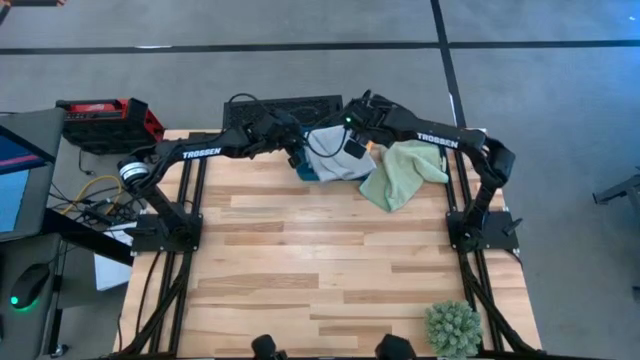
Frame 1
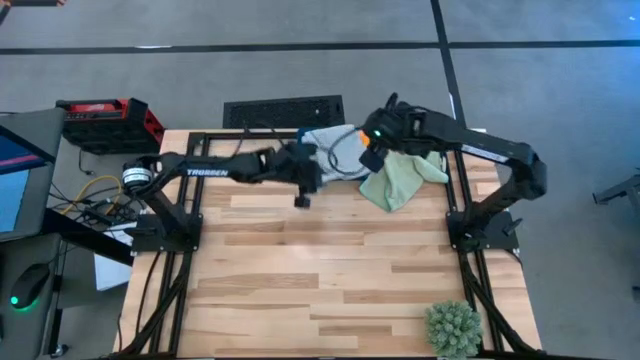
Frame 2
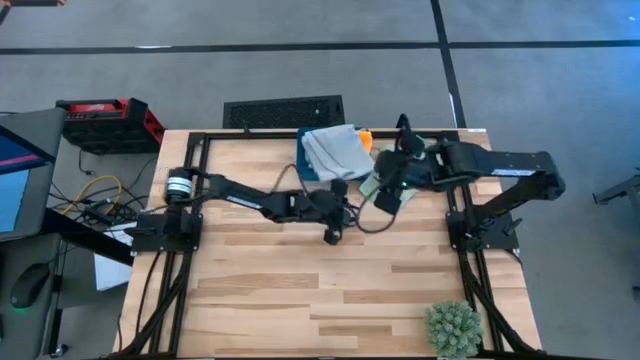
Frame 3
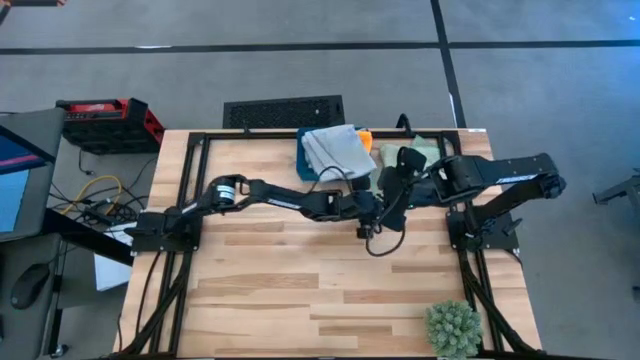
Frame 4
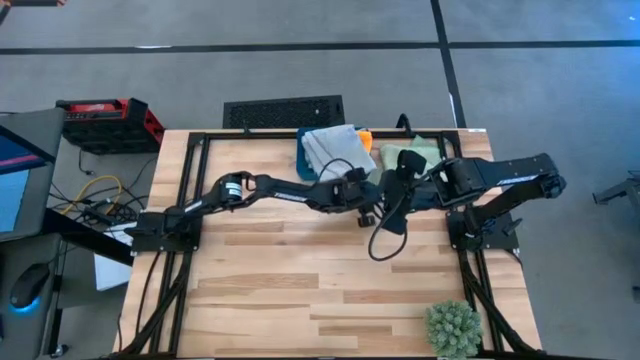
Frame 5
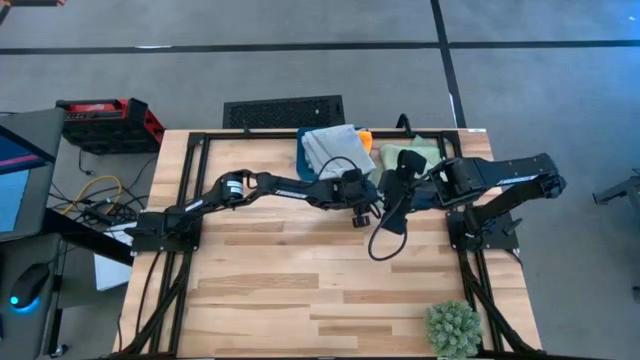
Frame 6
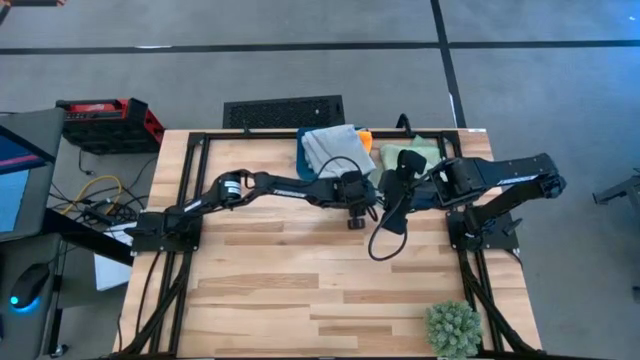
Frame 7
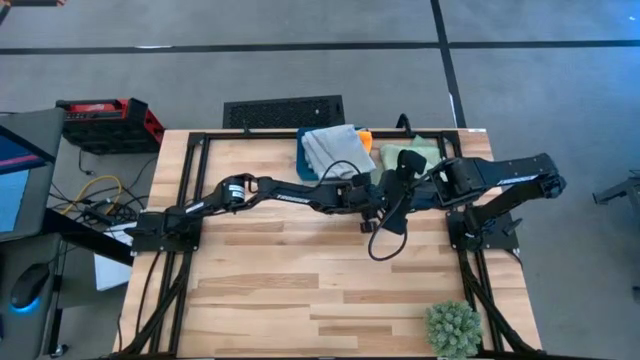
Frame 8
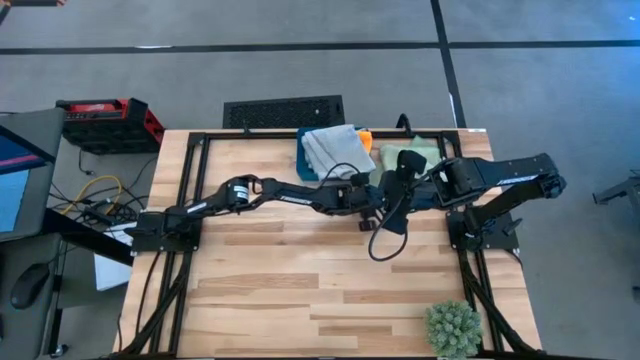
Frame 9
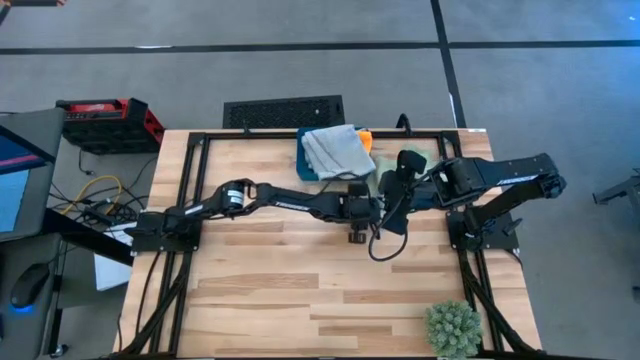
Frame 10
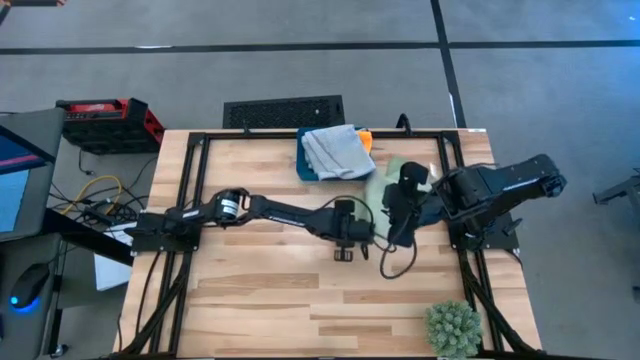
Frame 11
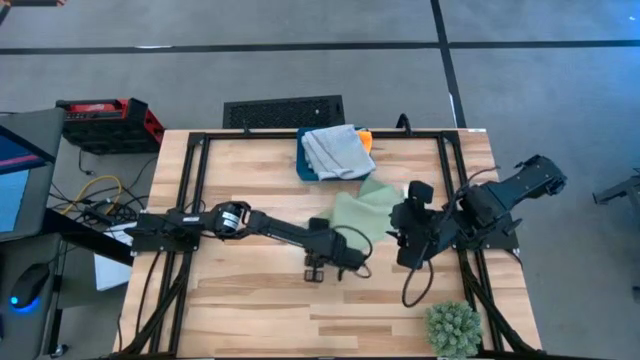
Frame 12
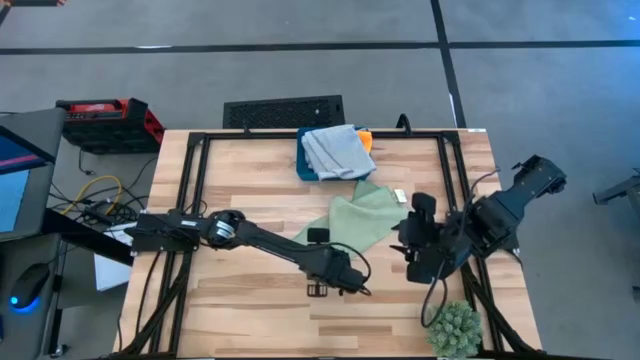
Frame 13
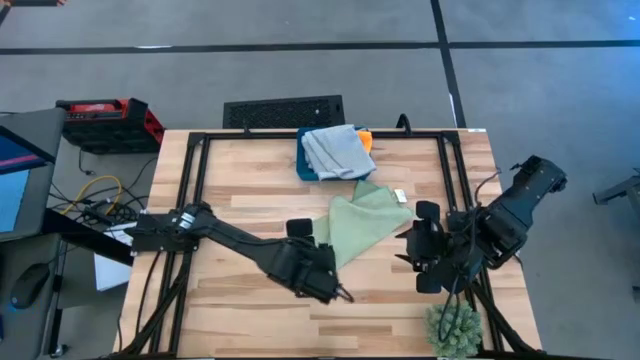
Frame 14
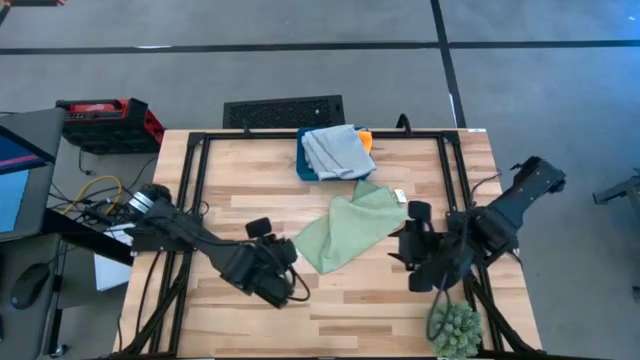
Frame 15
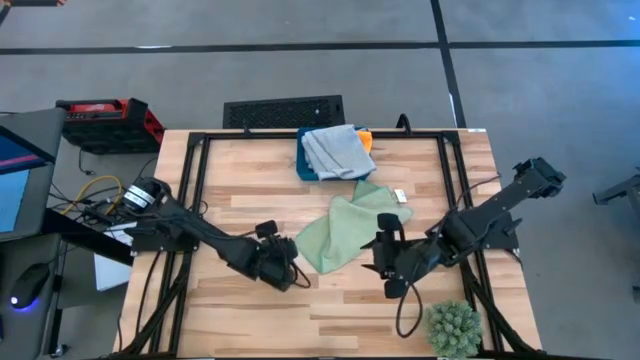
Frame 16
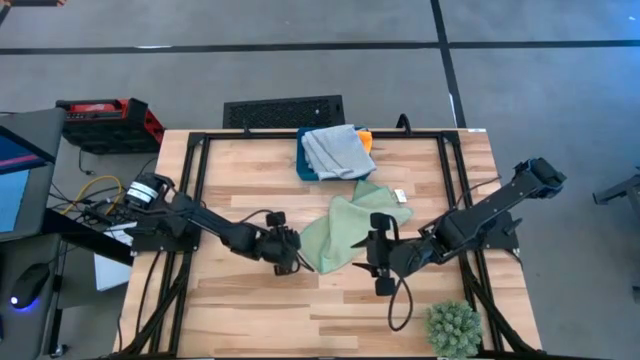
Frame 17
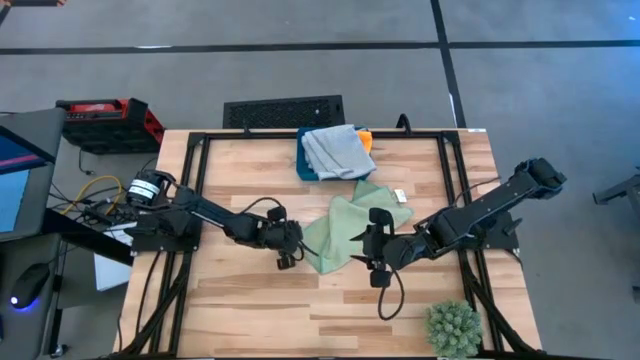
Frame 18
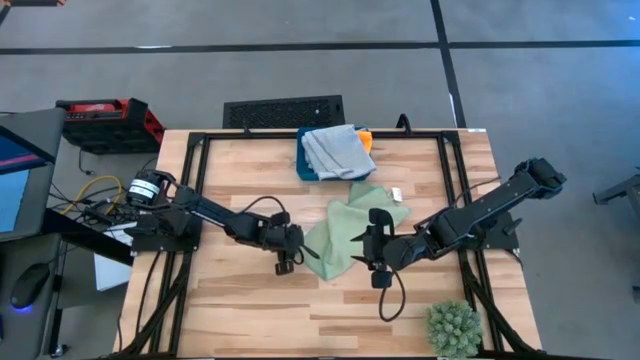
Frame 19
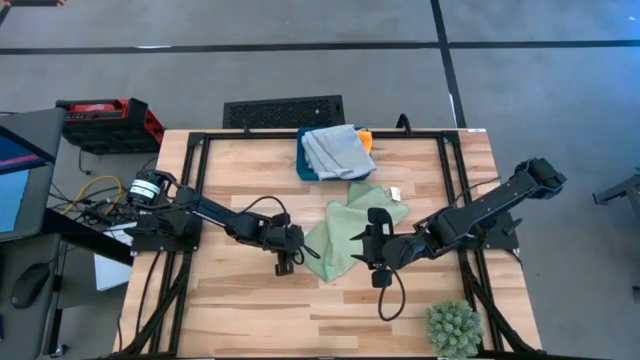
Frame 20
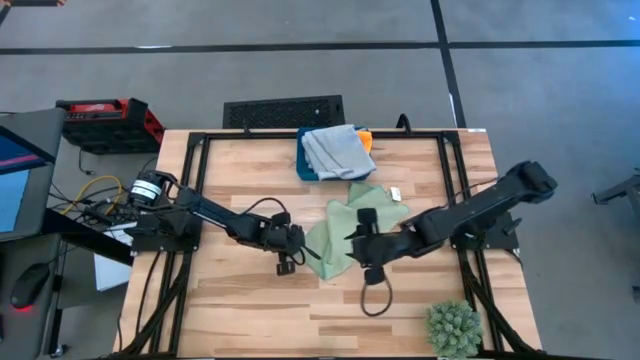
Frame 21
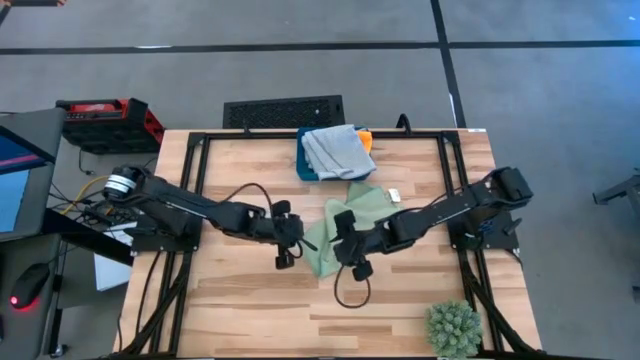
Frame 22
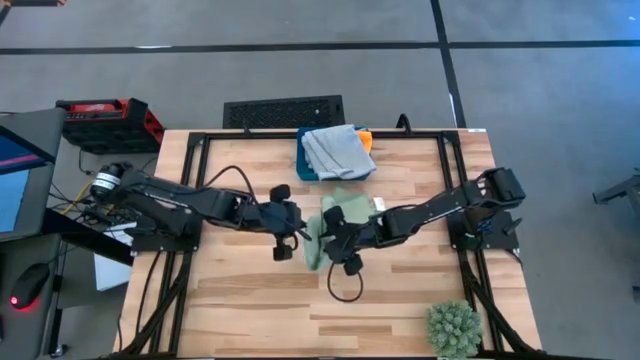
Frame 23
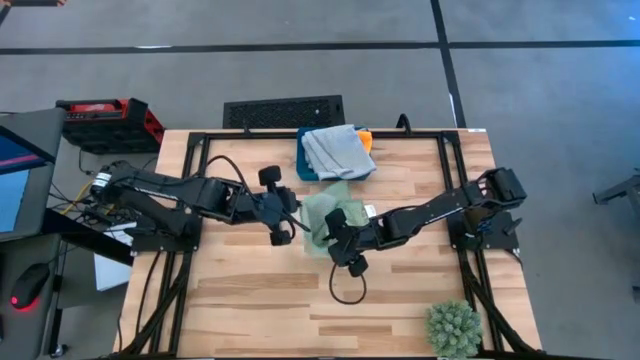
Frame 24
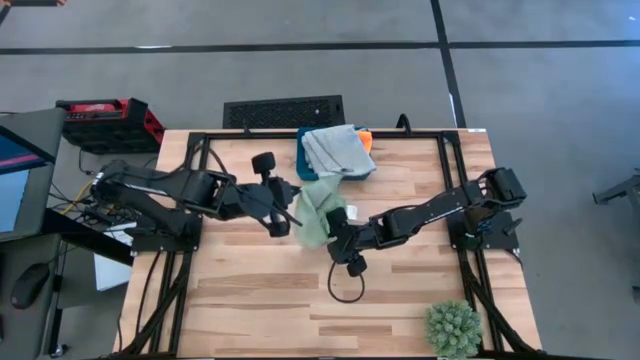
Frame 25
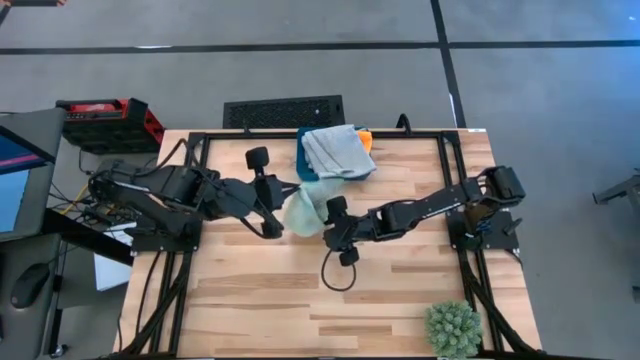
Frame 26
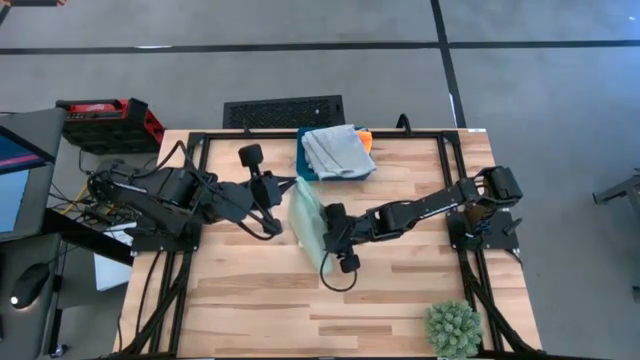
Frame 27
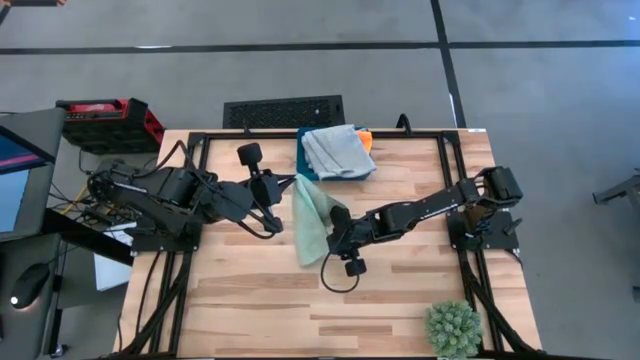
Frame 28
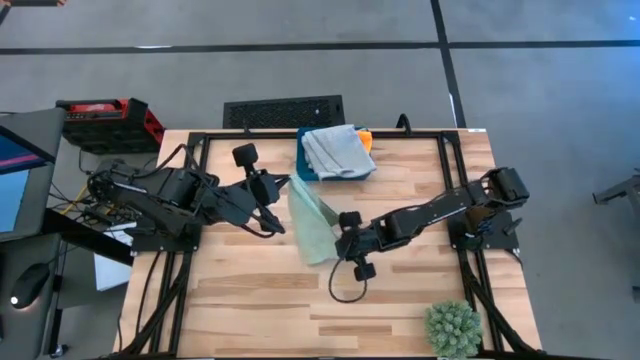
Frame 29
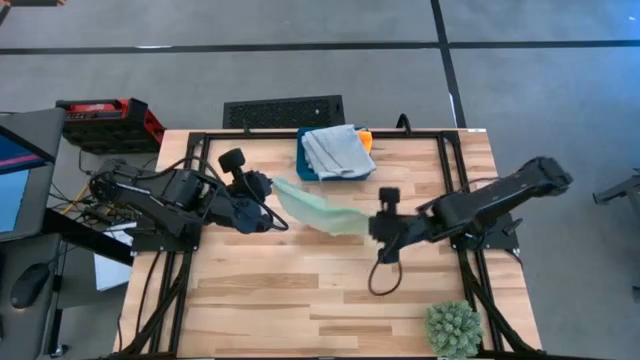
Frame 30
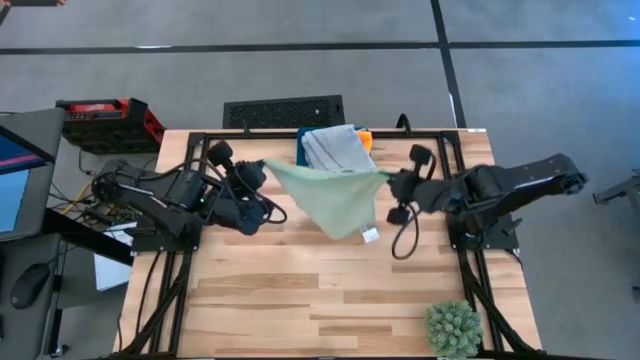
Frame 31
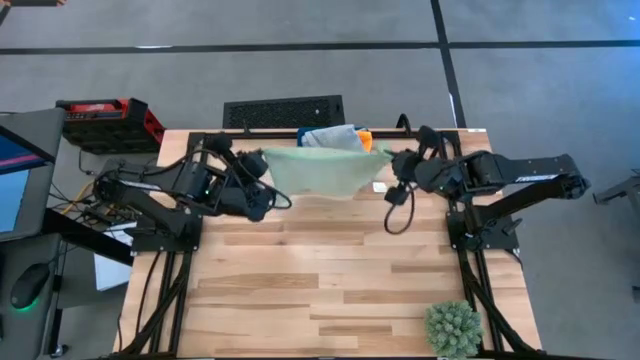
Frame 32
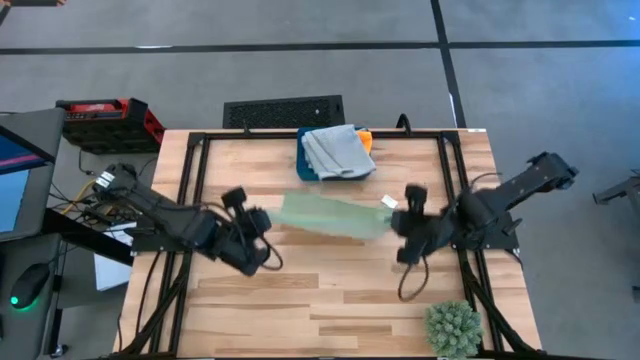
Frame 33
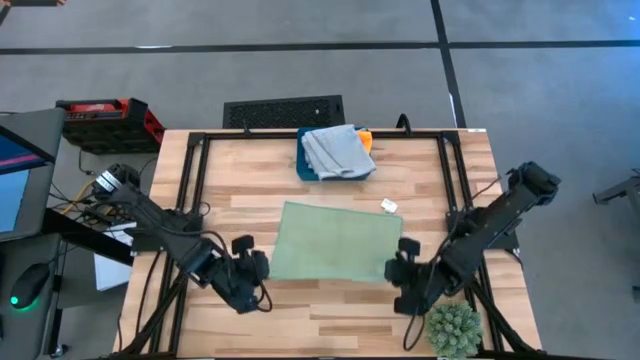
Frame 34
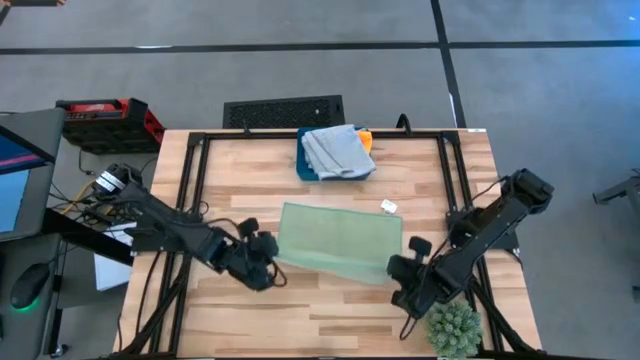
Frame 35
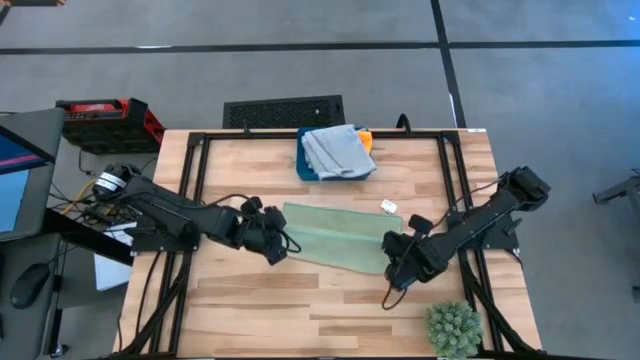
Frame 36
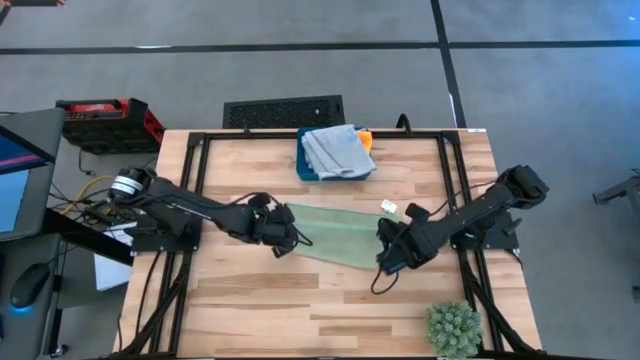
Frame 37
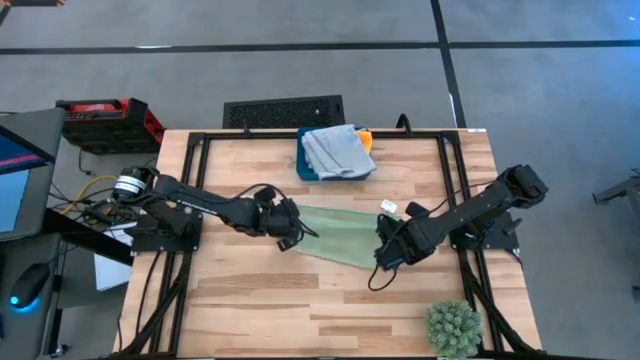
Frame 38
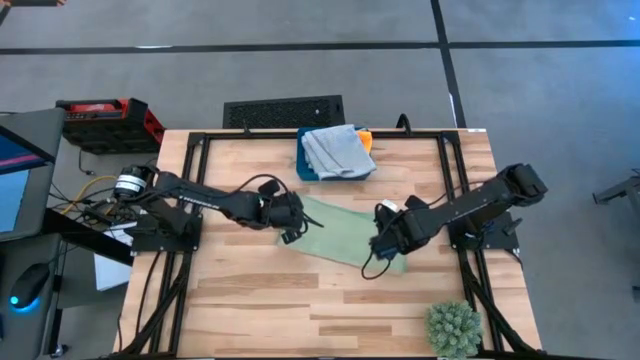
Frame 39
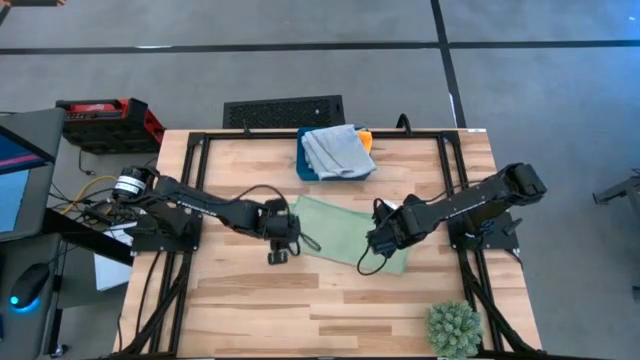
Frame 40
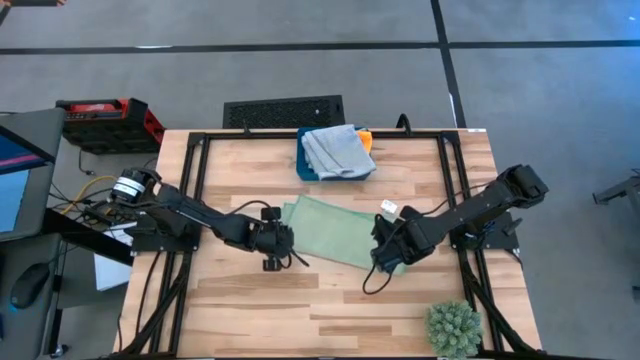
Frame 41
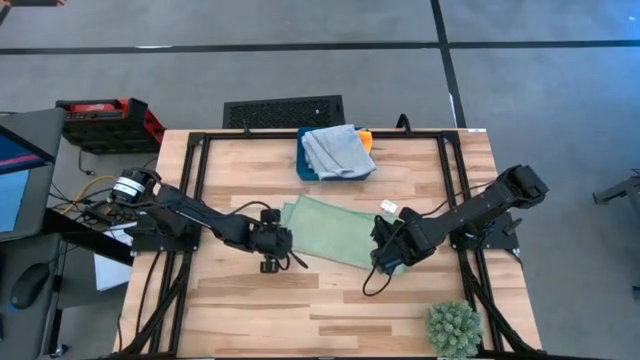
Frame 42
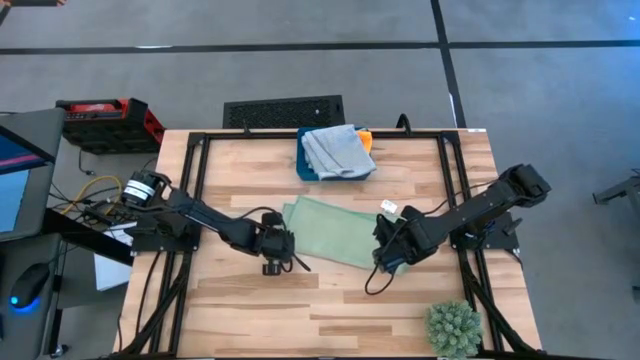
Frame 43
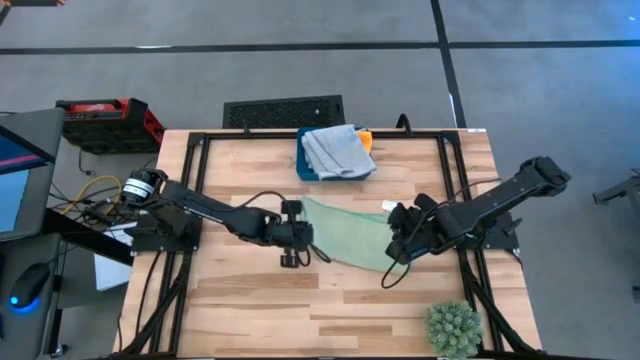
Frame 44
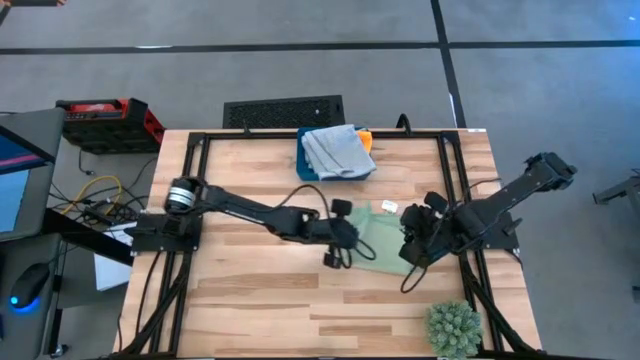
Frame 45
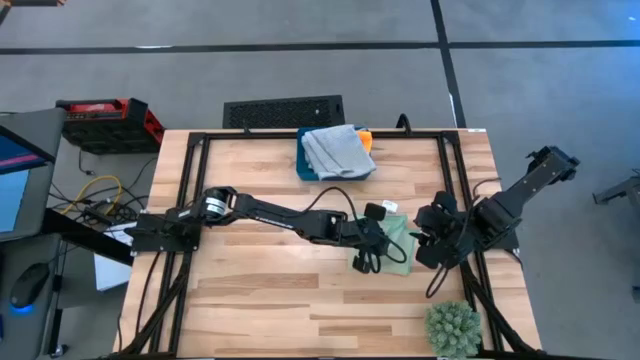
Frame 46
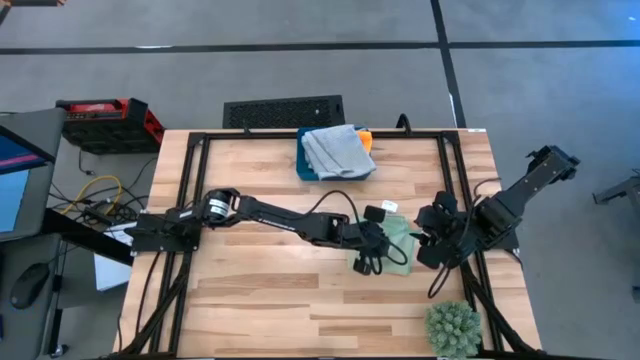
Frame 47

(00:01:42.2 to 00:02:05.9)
Task: Fold microfiber towels
Fold the green microfiber cloth
